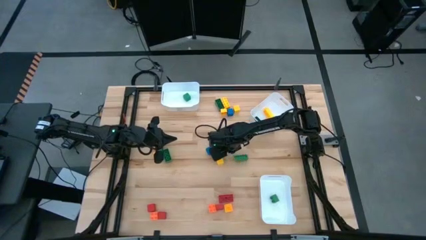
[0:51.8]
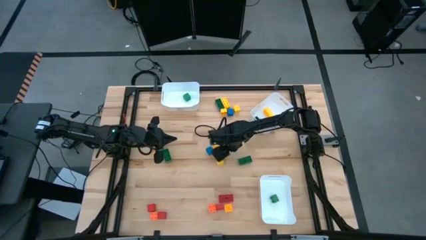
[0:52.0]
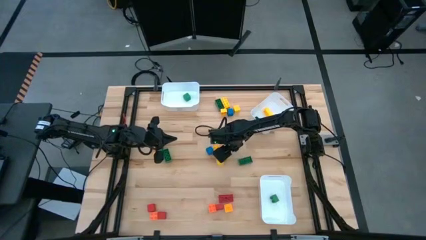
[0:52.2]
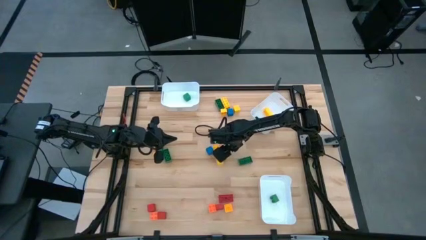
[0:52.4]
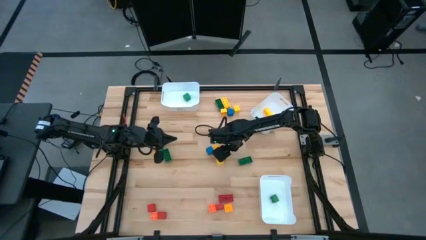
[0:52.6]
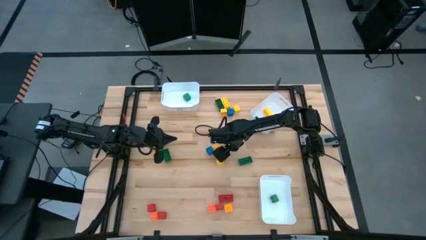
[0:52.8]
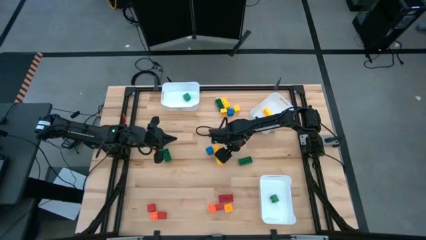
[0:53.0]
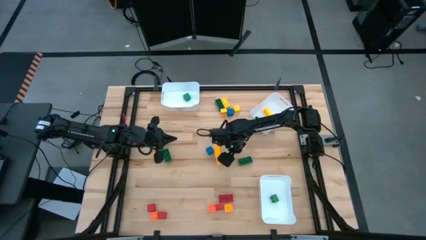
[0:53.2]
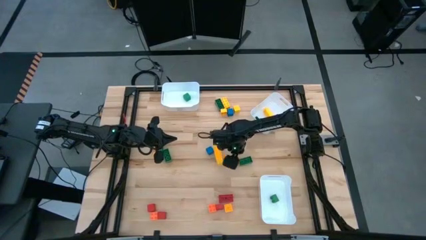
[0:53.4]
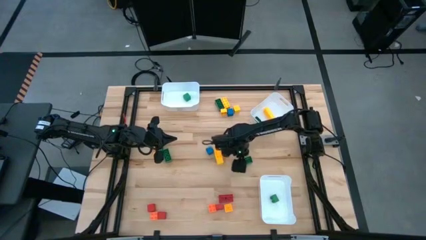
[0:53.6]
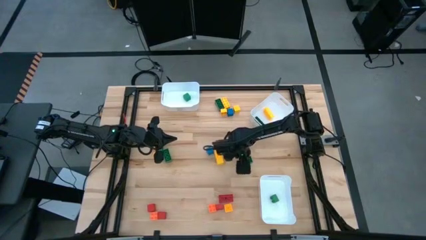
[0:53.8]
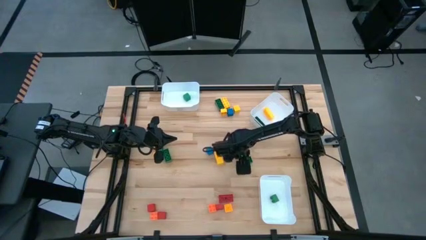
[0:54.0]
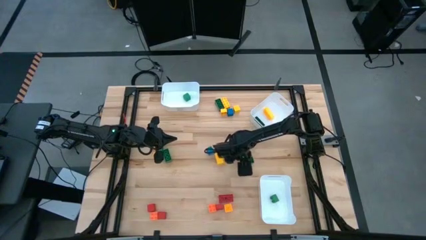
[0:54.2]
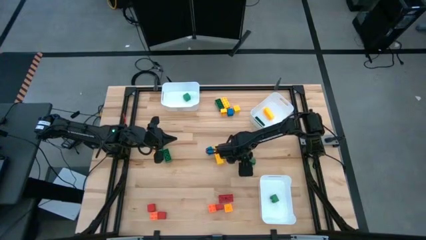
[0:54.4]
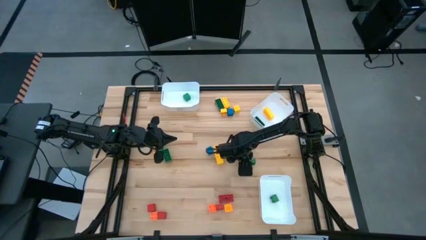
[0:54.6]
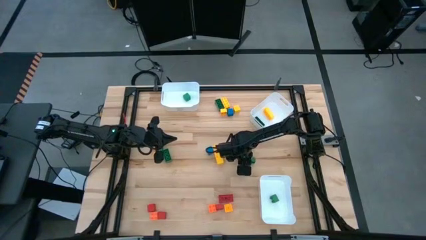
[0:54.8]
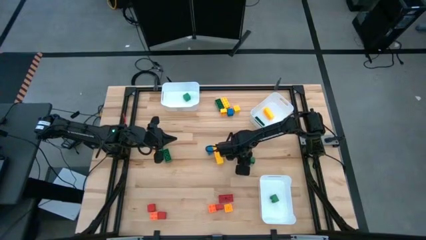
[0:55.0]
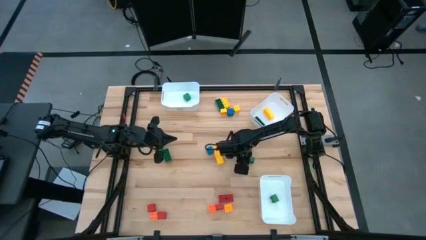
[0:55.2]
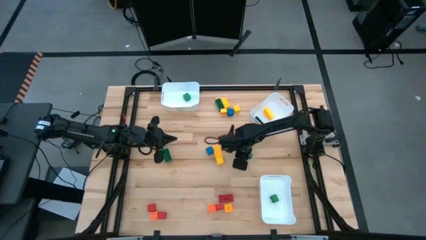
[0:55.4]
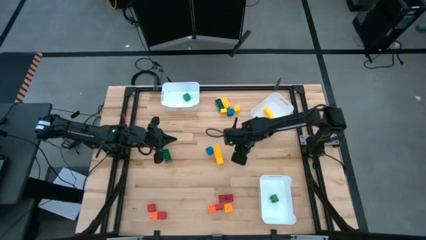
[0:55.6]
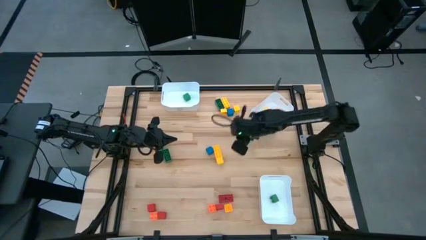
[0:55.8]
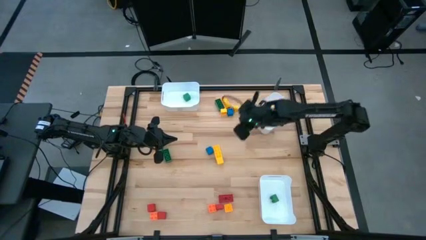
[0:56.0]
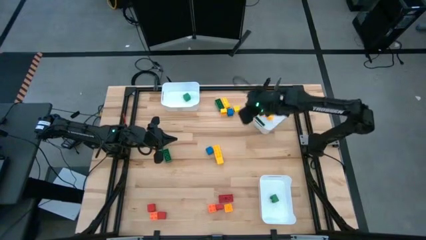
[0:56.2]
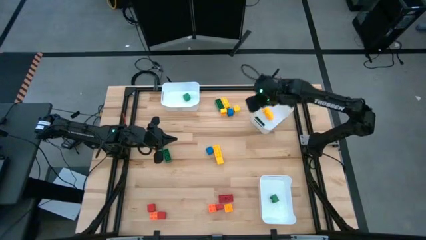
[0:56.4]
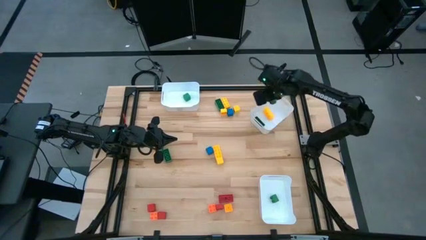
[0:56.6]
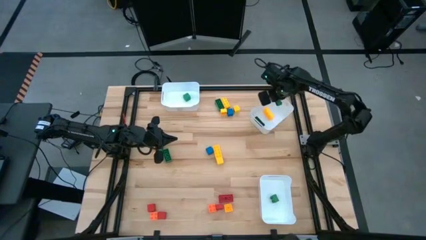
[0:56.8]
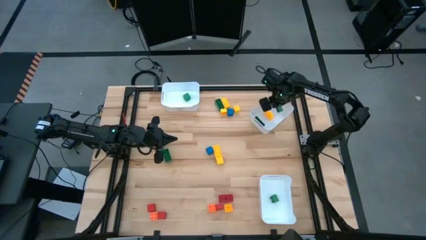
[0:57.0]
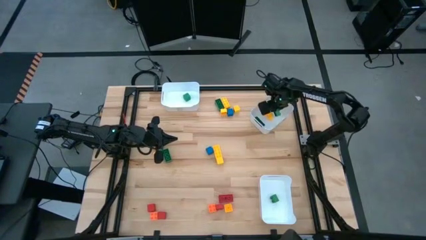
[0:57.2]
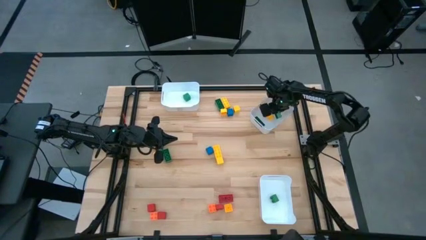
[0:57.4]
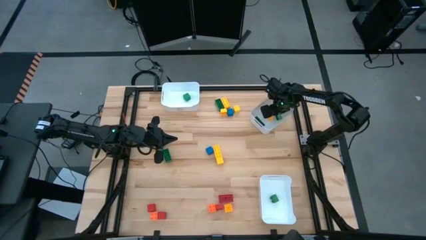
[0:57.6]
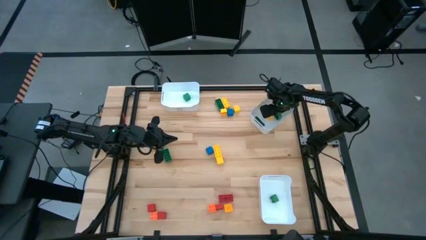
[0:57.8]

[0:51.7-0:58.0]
Task: Sort blocks by size
Put the green 8 stud gamepiece into the top right white bin

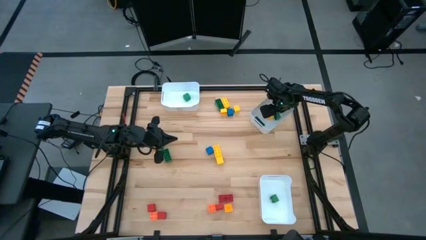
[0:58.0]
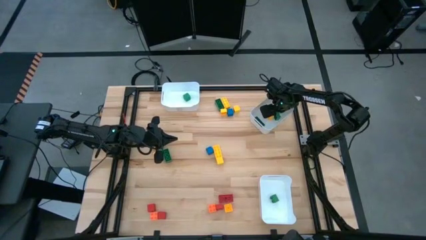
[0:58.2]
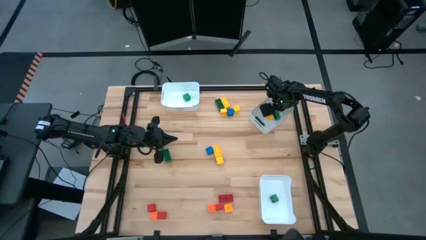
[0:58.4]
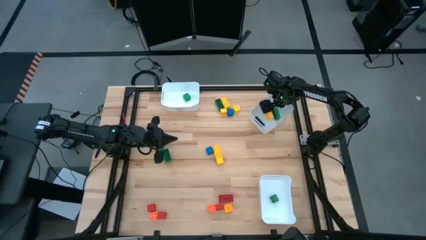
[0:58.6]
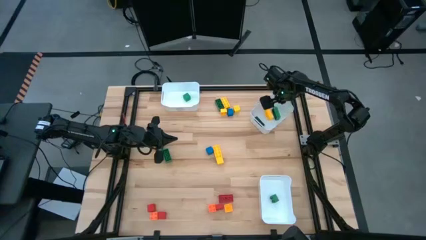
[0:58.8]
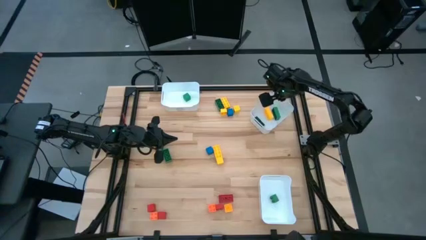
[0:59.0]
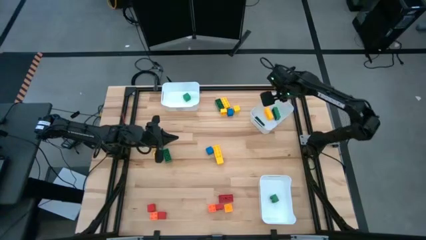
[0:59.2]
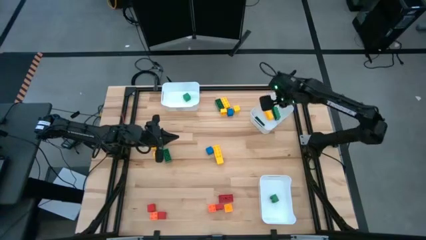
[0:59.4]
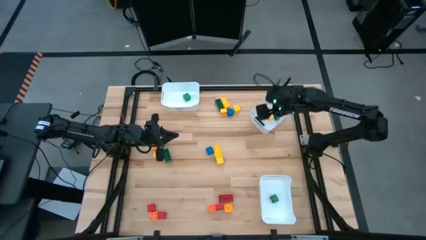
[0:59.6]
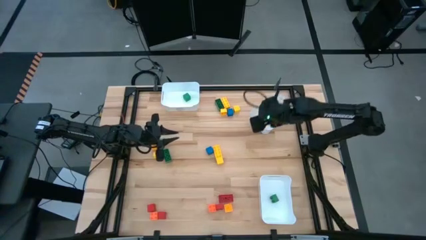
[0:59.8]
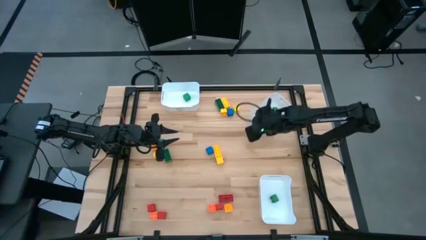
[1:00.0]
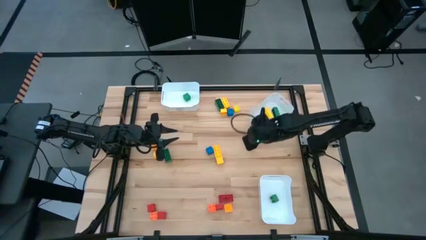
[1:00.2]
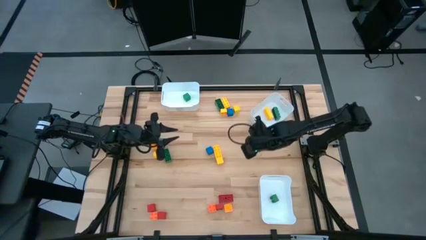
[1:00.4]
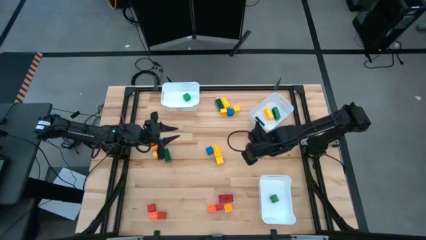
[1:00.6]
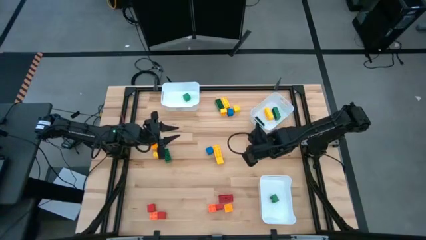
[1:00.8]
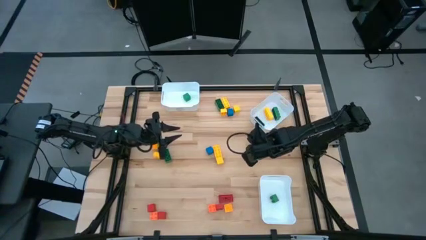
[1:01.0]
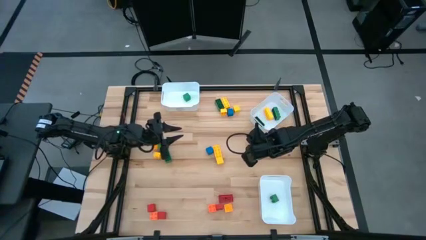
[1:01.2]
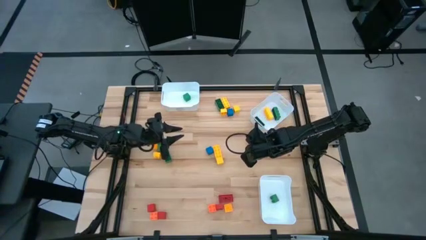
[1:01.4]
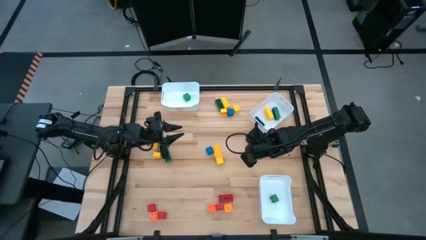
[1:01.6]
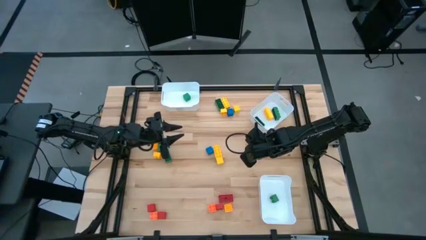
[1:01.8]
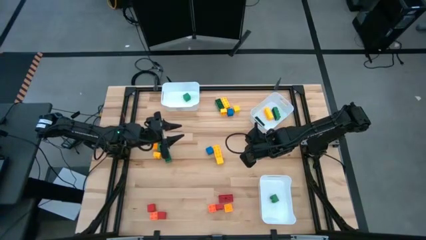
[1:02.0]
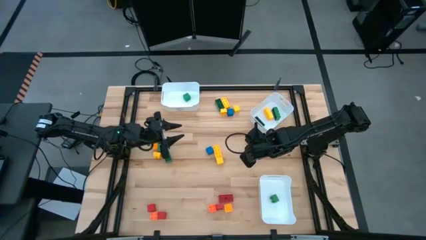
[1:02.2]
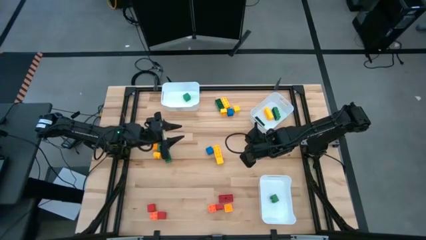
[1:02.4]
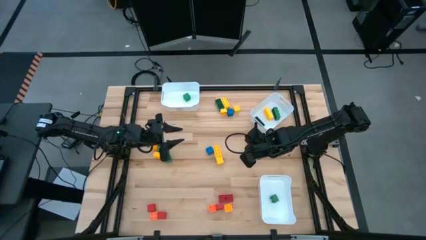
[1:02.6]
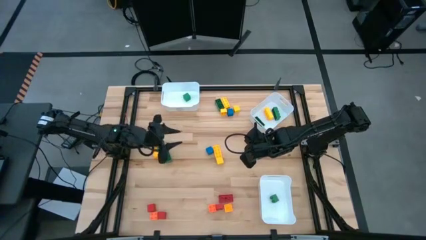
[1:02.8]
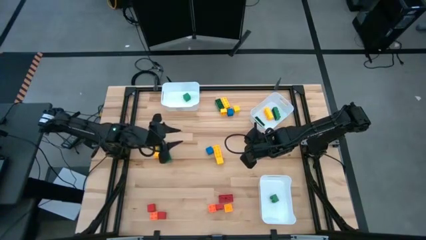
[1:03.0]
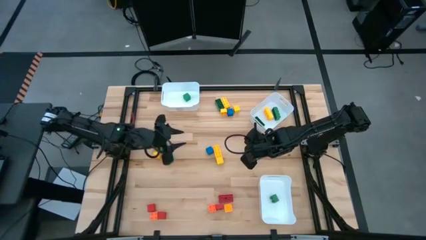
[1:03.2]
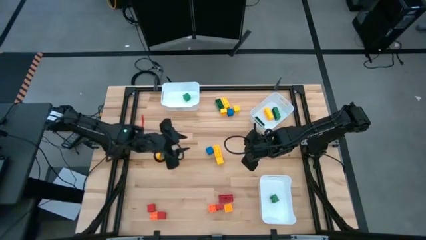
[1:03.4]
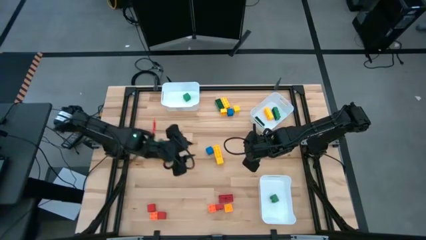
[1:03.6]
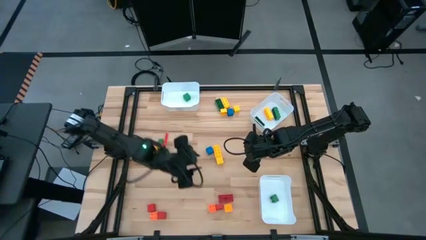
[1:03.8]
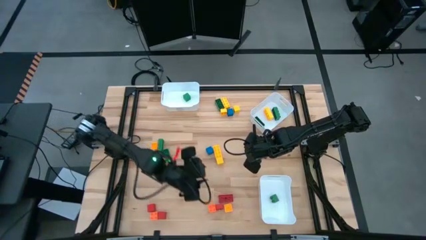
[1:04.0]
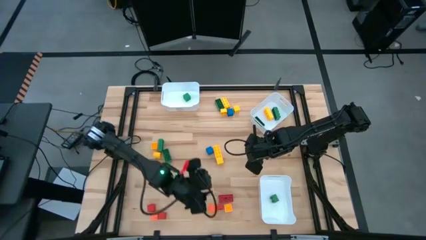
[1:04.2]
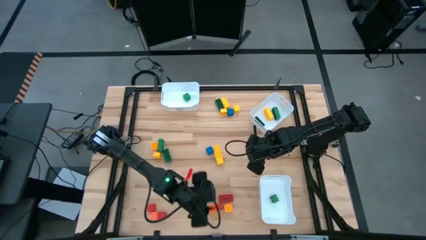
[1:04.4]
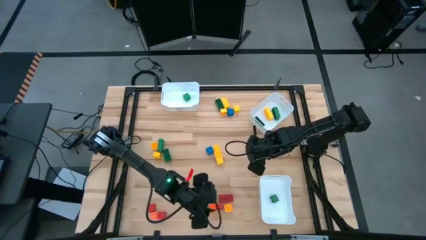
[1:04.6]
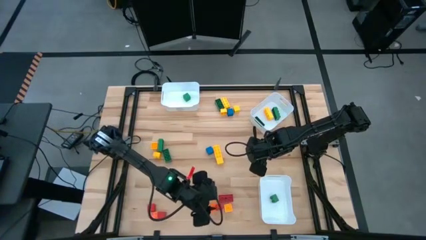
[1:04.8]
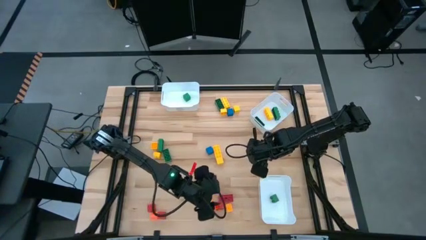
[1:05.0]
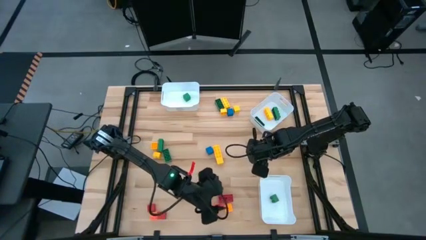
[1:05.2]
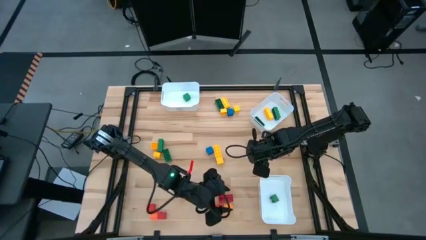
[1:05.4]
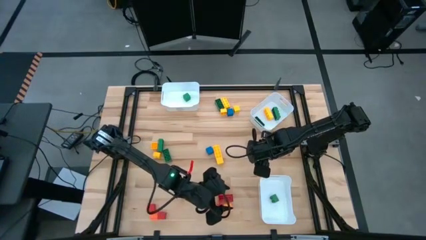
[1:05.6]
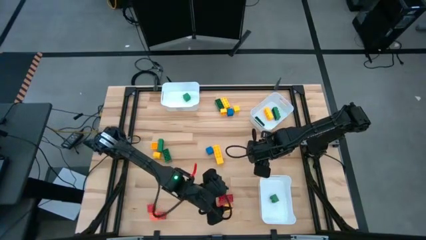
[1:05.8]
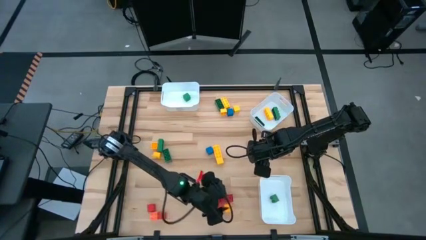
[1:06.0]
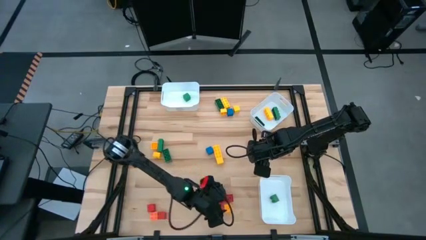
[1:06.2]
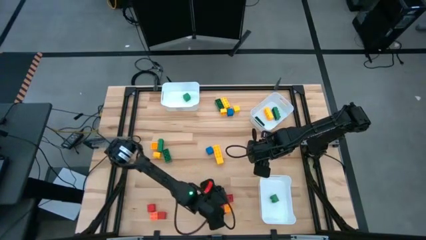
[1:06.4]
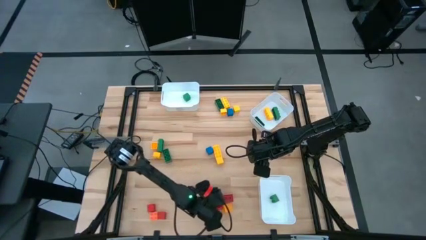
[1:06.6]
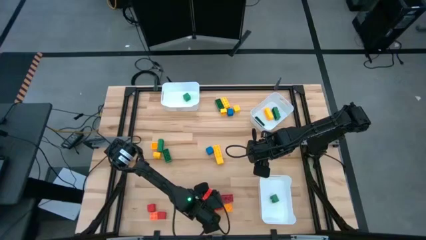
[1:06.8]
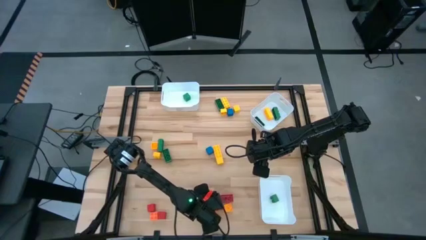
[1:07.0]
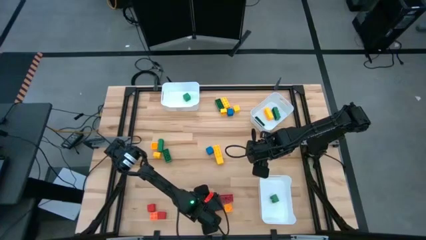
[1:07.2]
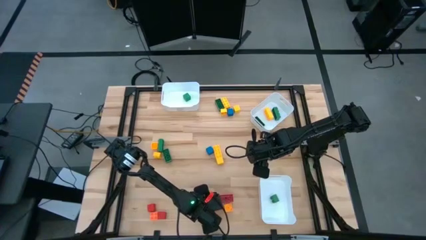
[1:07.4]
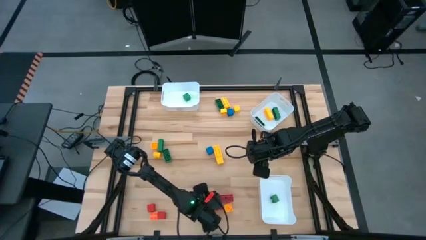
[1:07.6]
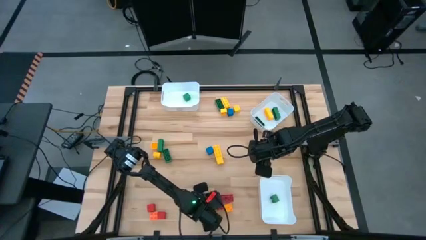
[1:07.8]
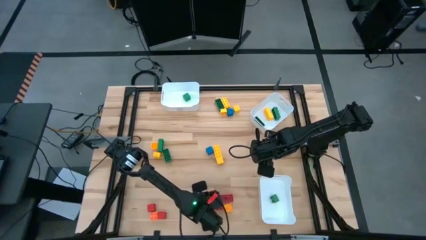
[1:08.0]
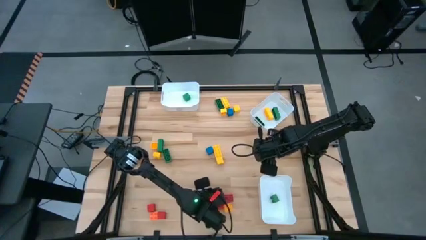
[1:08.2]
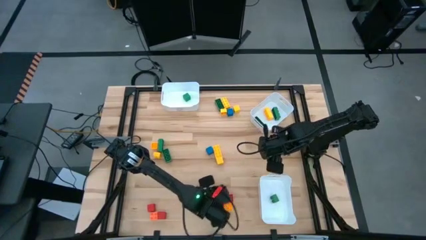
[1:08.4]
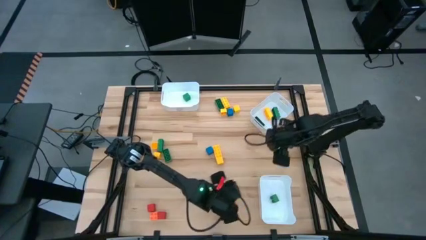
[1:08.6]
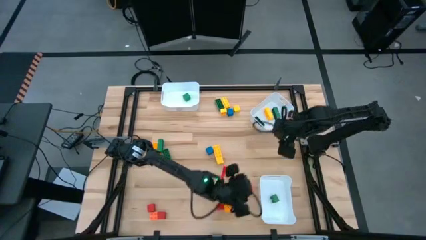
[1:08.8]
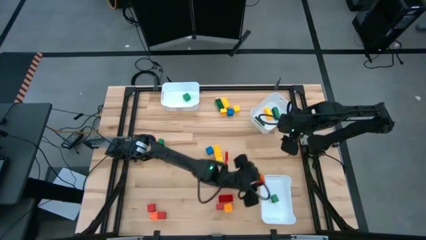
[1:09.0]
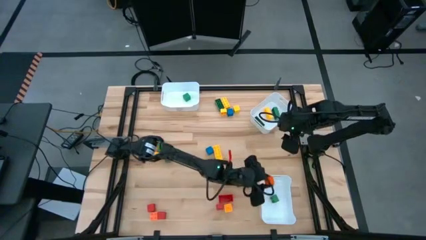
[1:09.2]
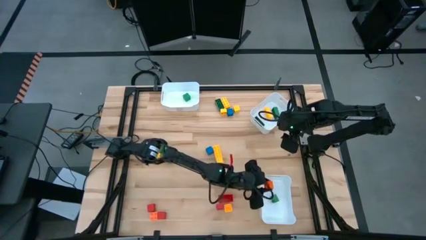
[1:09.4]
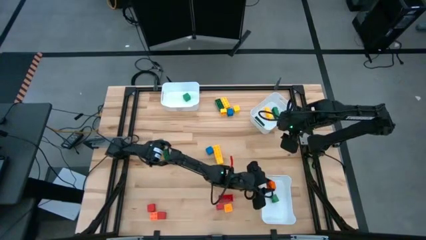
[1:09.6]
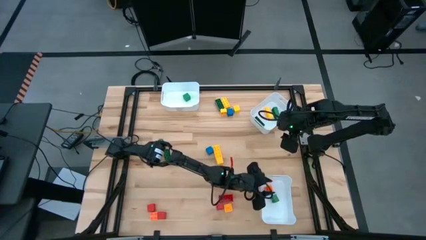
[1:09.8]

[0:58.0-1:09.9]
Put the orange 4 stud gamepiece into the bottom white bin
